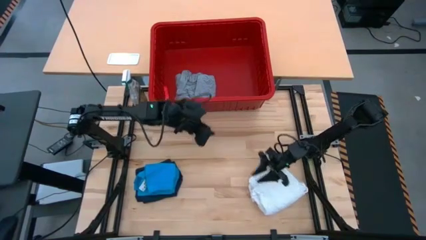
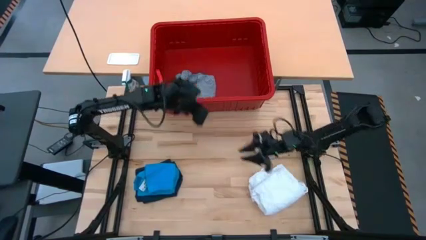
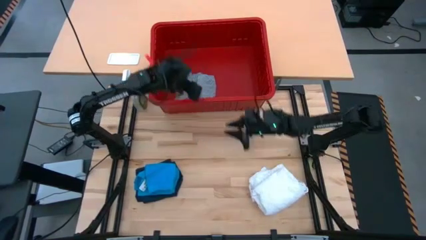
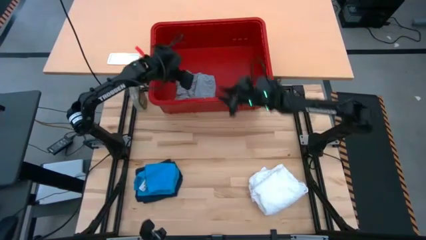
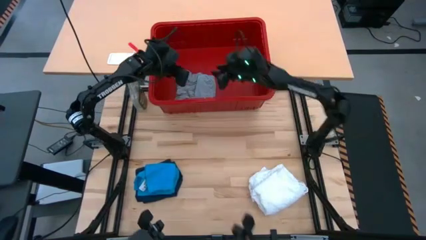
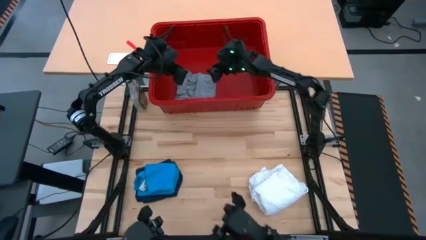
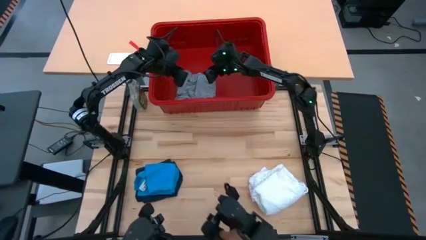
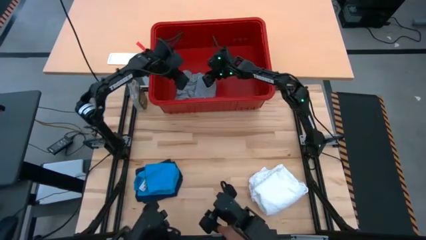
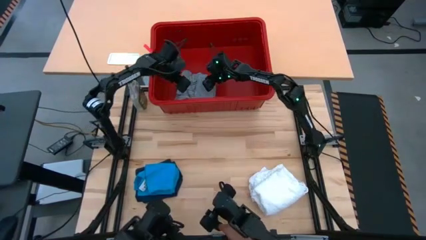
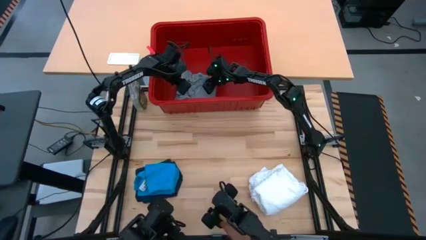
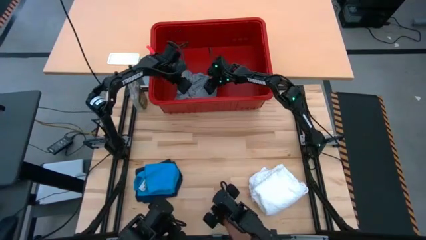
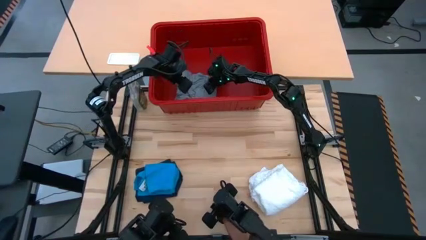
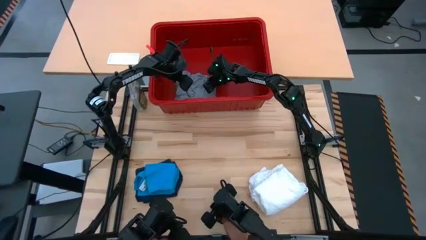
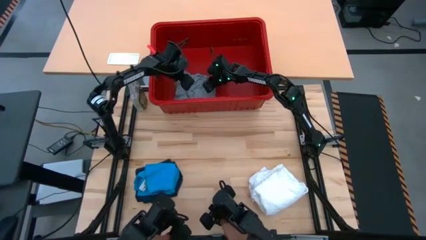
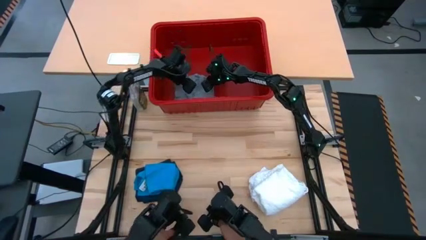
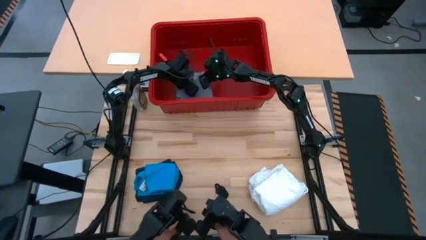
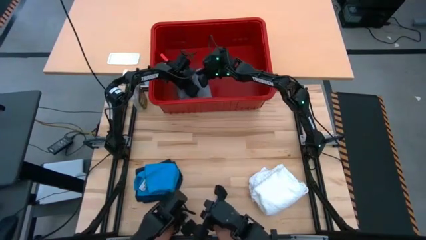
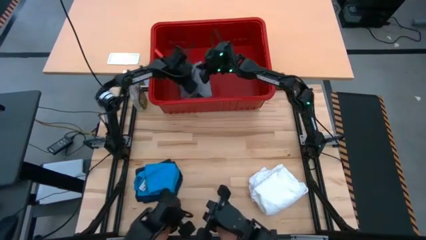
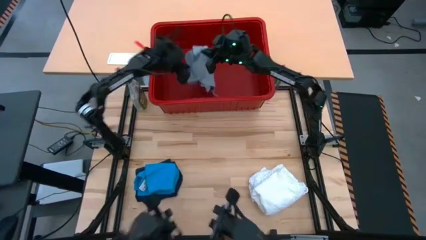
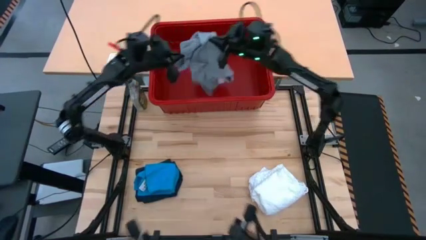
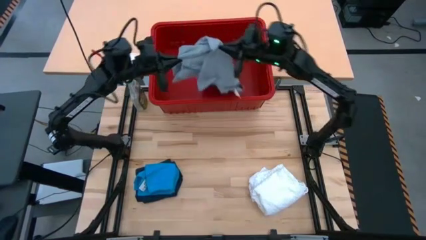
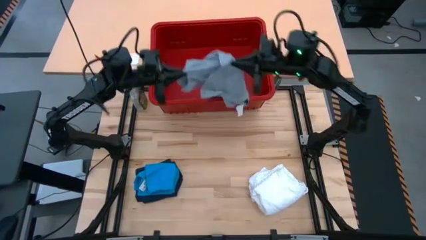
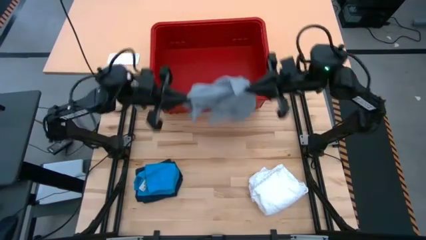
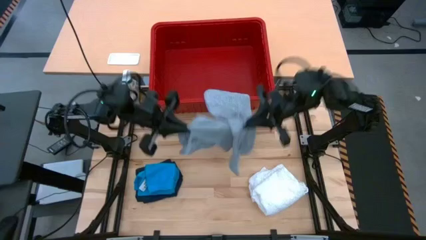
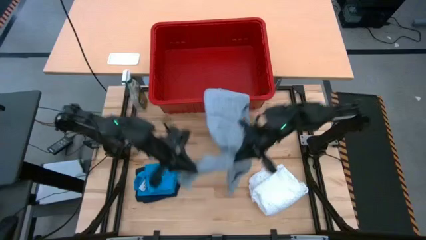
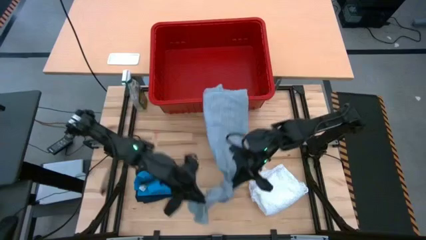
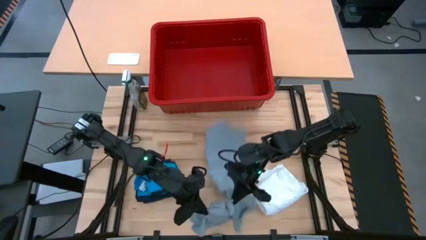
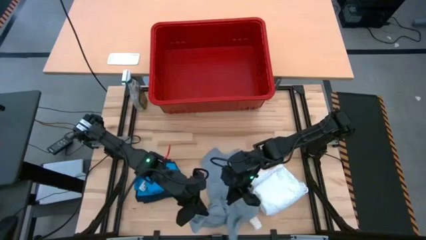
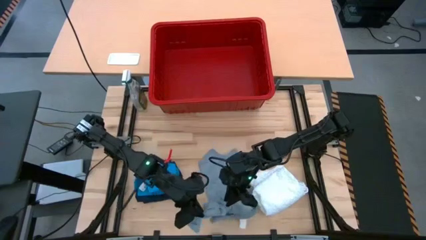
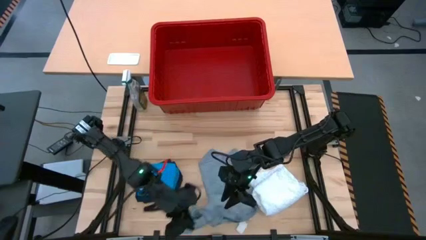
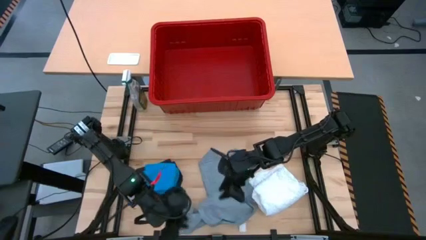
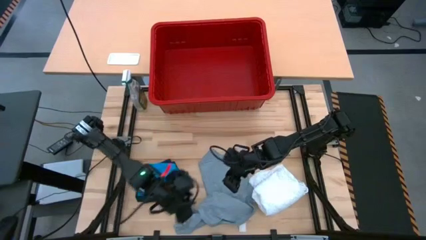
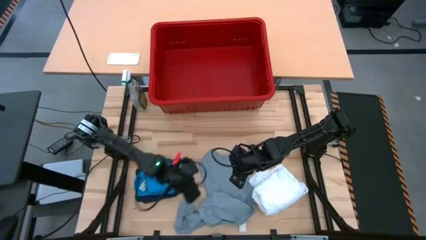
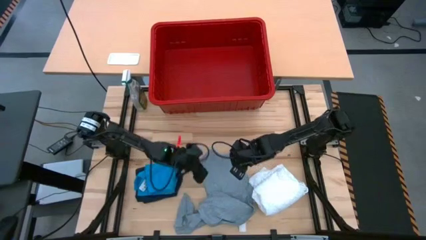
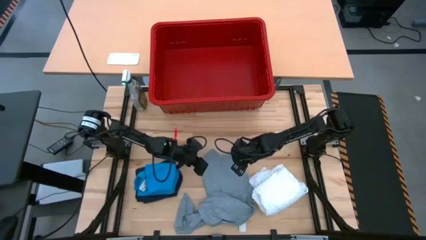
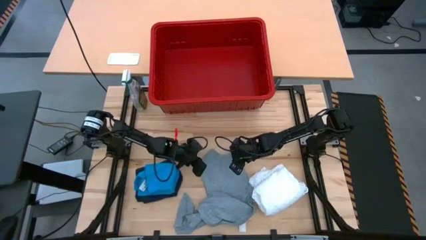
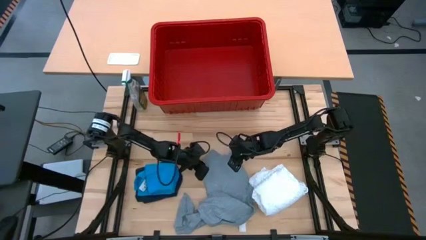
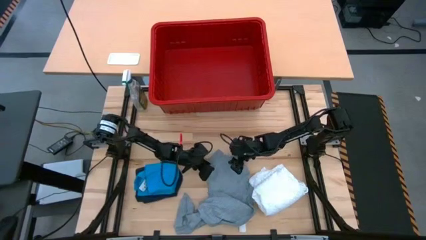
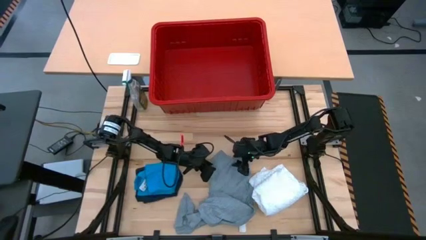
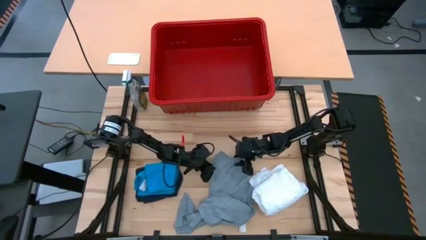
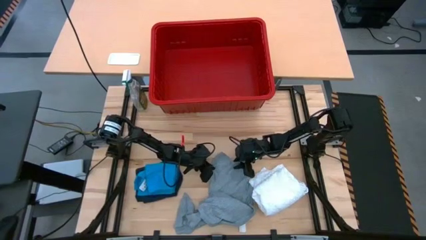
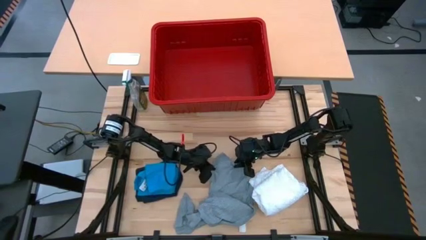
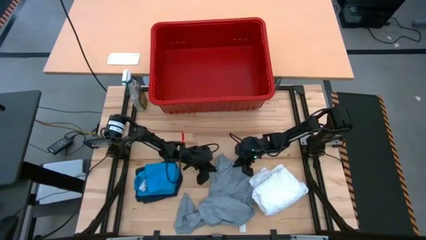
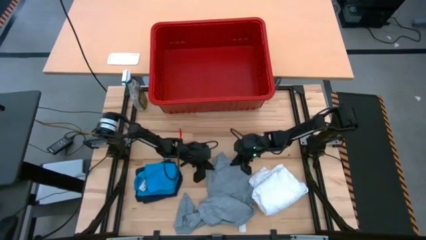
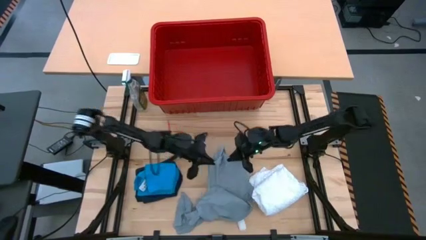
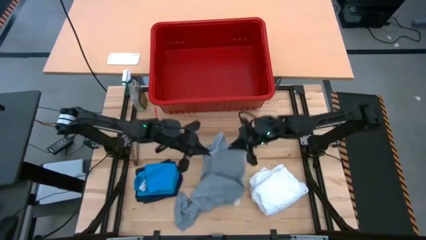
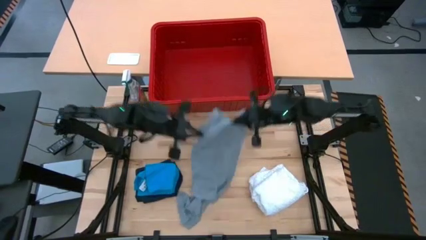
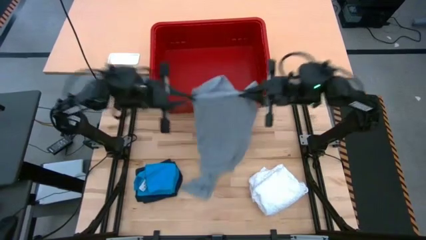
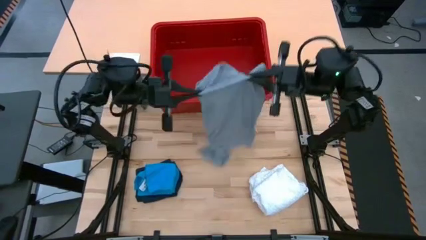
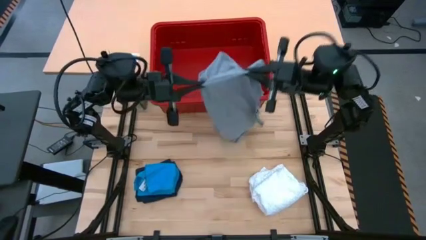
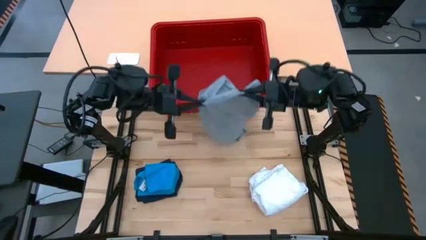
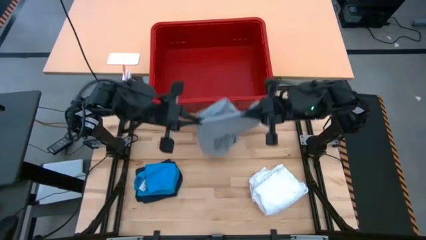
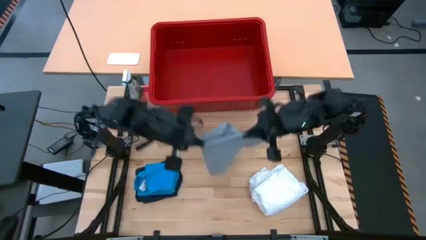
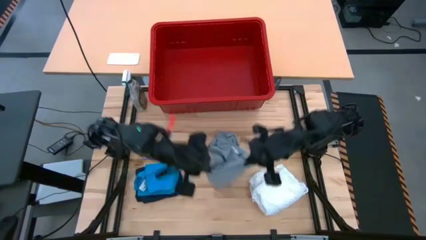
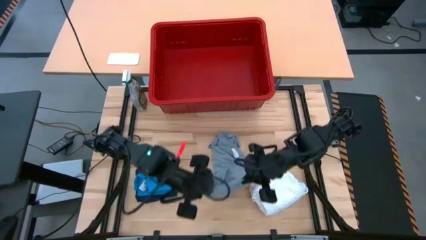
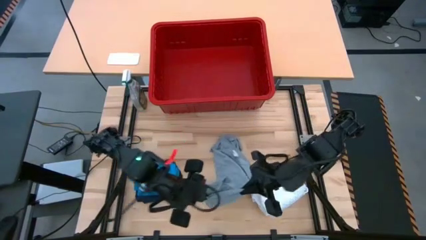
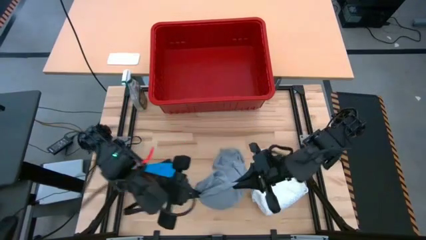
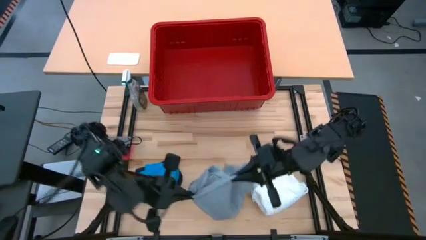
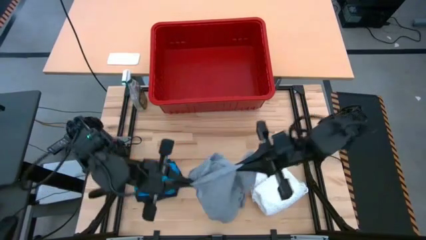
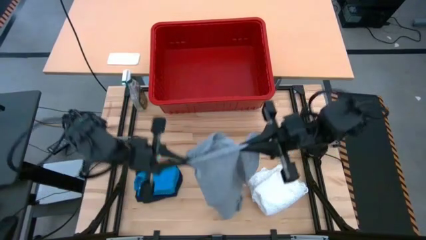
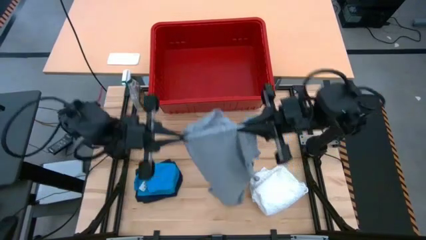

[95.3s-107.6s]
Task: Fold laundry
Fold the gray shirt

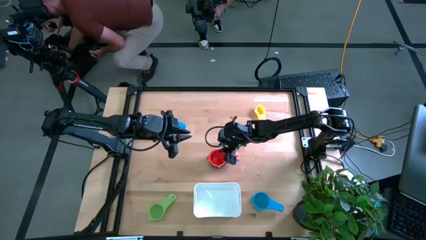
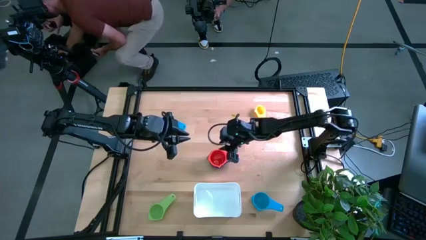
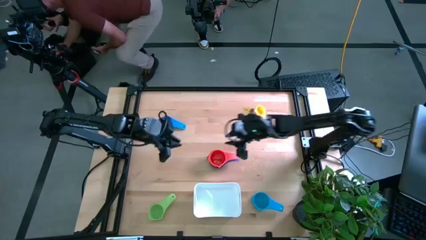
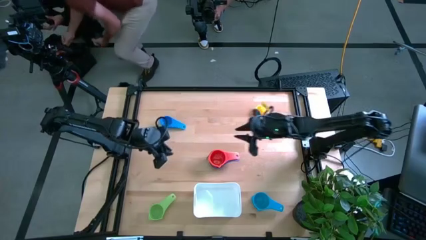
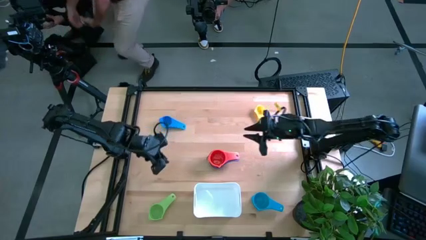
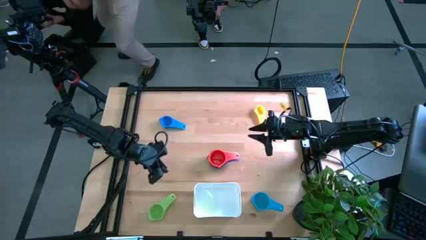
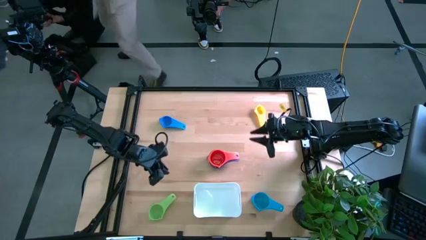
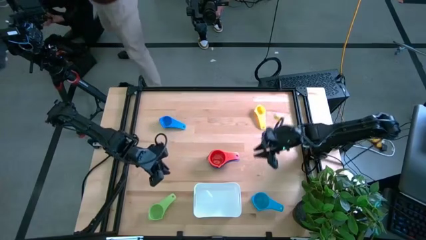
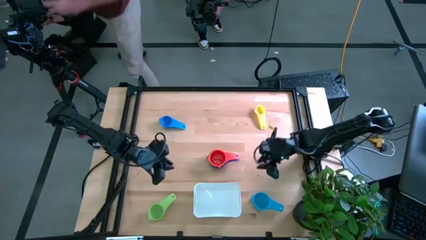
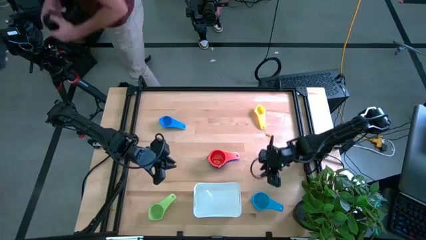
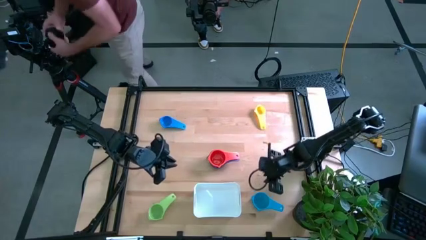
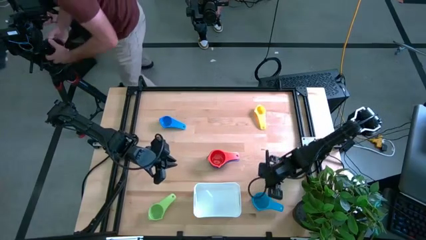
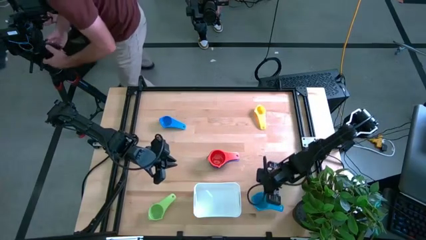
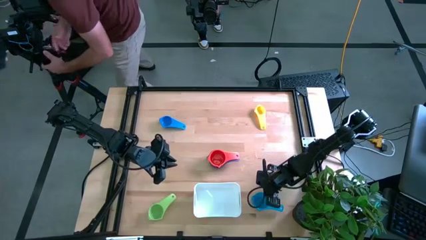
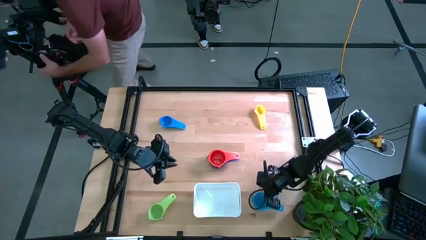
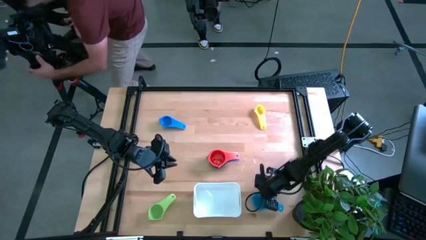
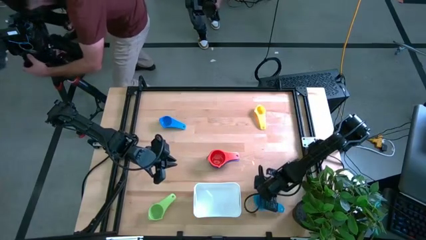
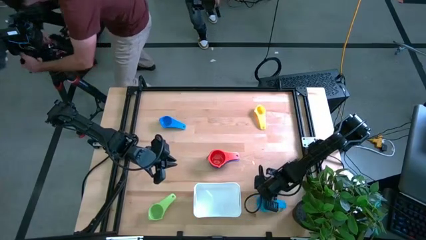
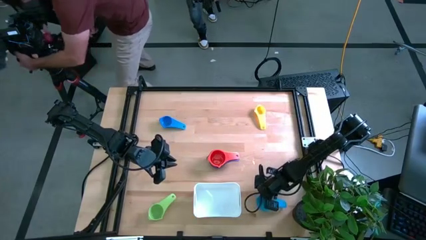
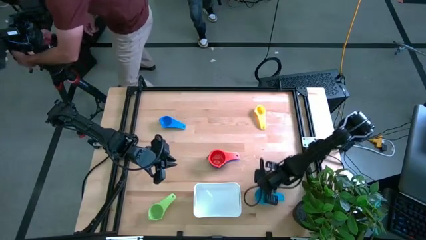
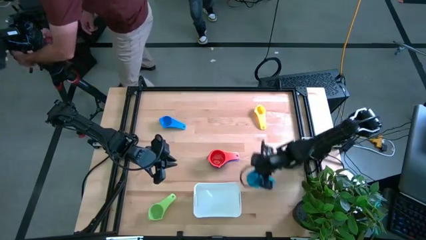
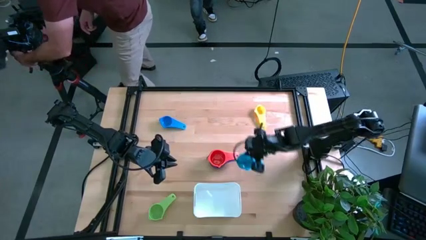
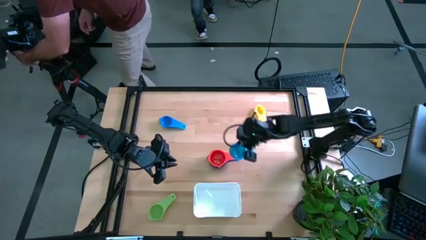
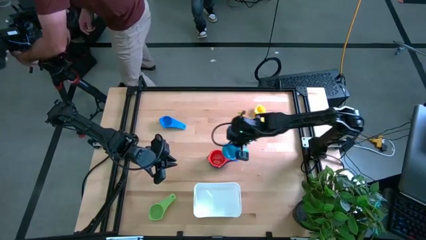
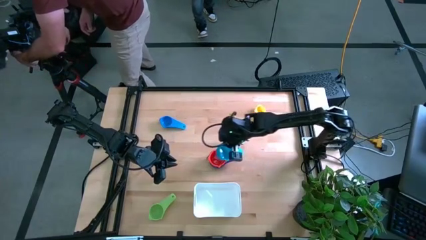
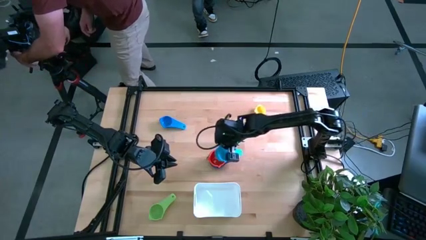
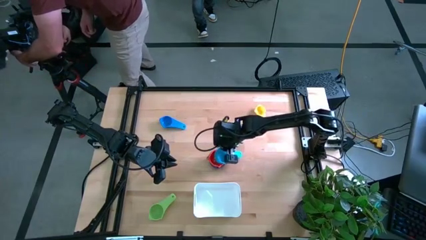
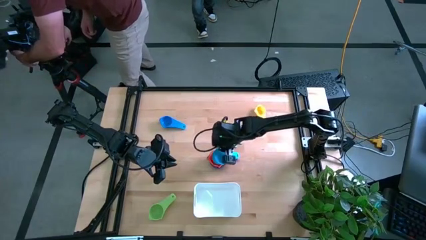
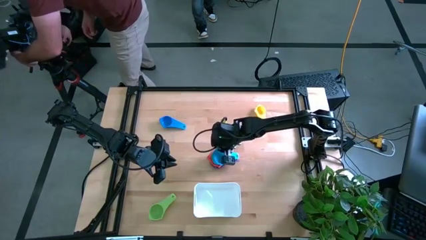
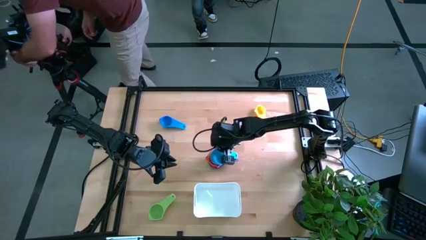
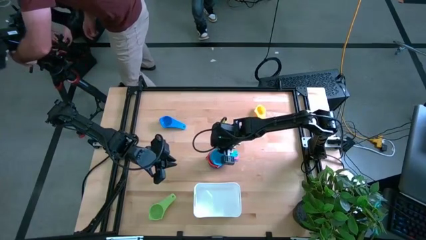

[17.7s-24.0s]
Task: Nest measuring cups in basket
Stack the light blue measuring cup on top of the red measuring cup
